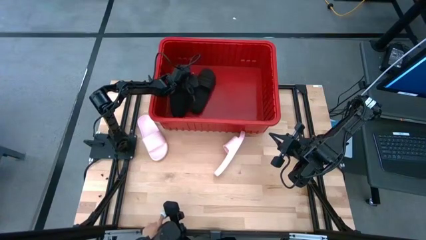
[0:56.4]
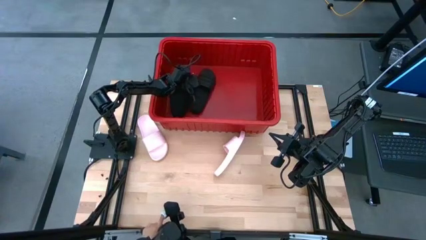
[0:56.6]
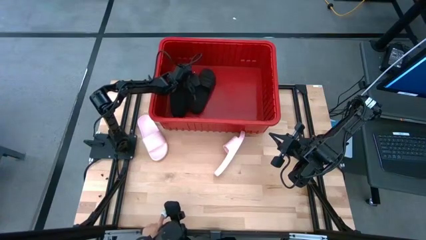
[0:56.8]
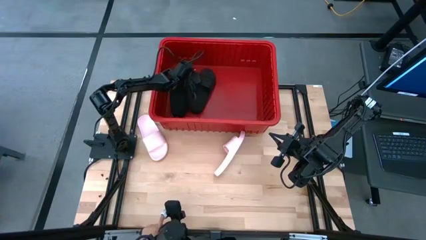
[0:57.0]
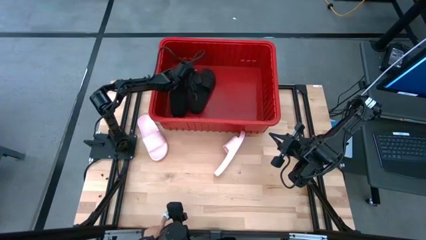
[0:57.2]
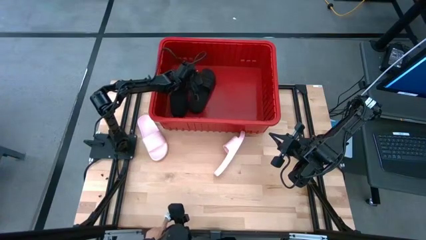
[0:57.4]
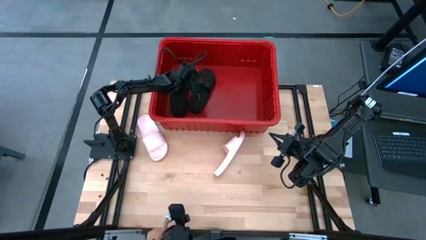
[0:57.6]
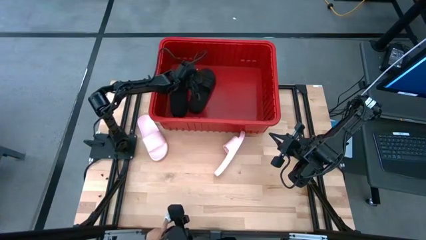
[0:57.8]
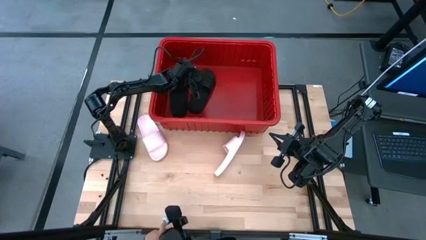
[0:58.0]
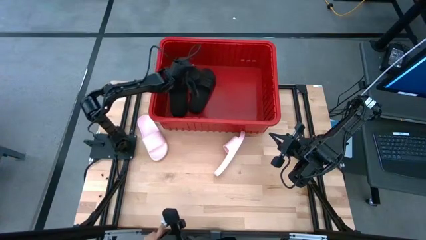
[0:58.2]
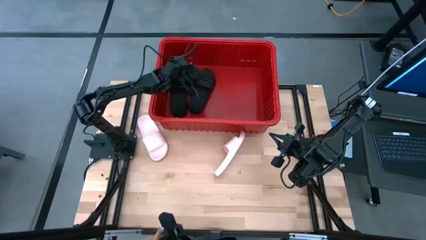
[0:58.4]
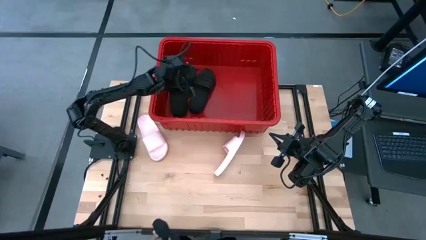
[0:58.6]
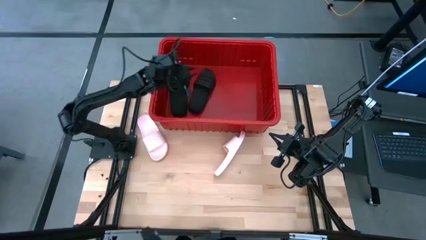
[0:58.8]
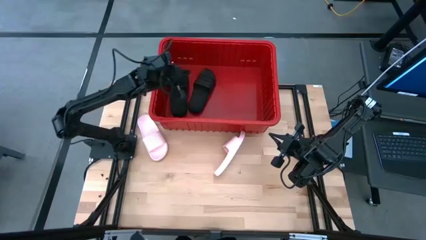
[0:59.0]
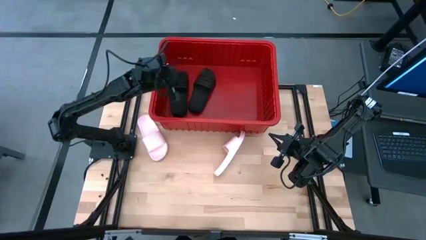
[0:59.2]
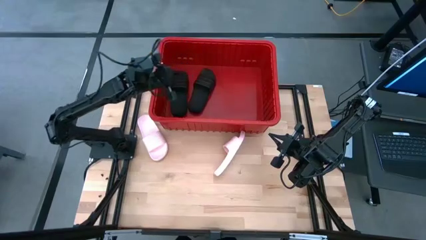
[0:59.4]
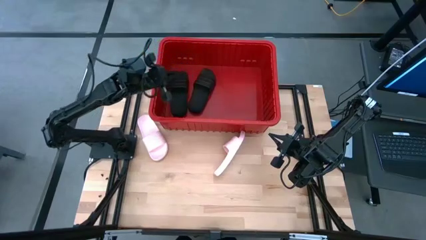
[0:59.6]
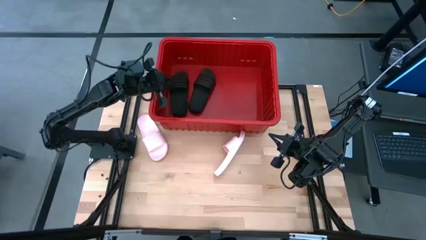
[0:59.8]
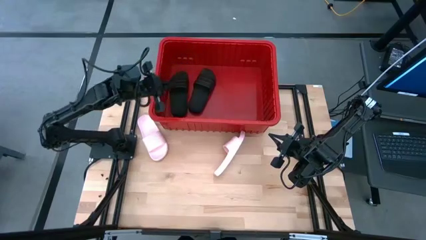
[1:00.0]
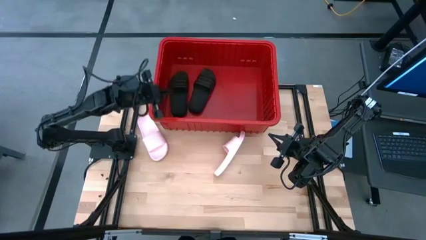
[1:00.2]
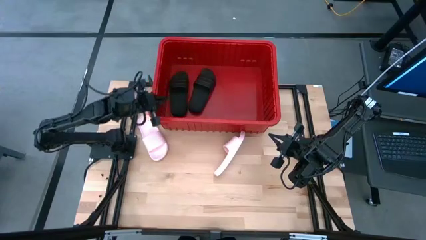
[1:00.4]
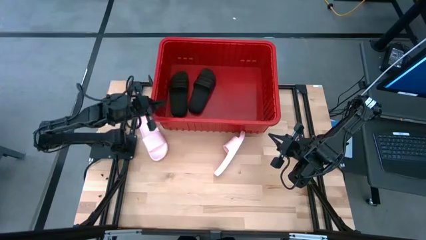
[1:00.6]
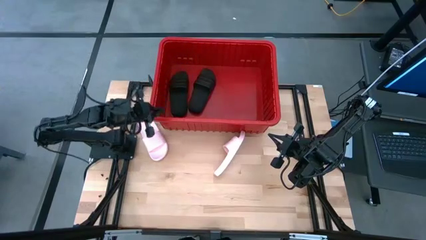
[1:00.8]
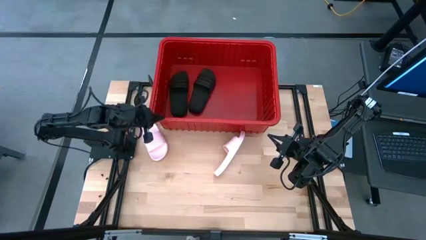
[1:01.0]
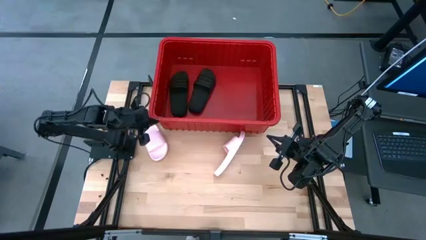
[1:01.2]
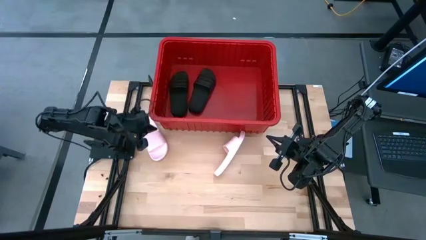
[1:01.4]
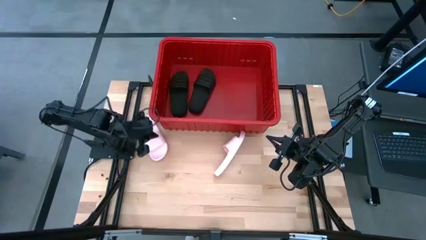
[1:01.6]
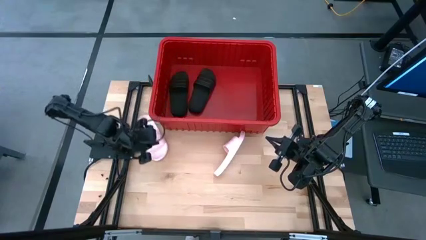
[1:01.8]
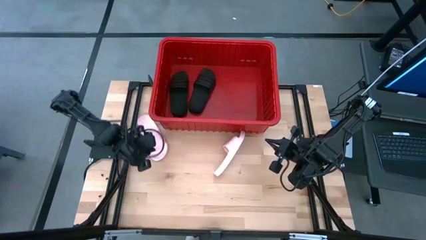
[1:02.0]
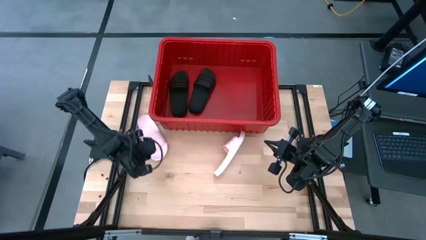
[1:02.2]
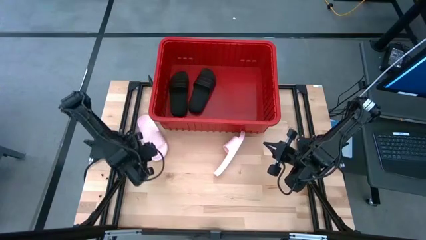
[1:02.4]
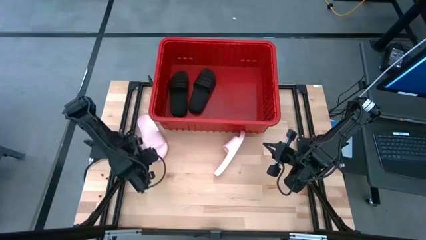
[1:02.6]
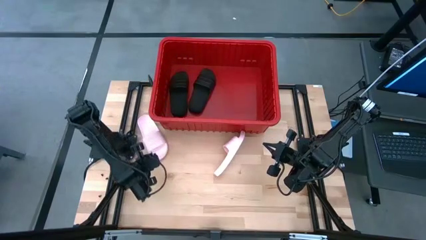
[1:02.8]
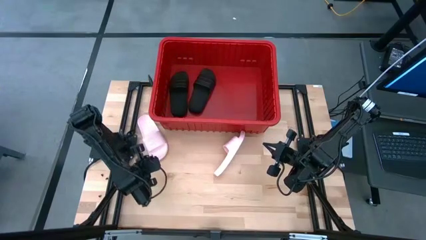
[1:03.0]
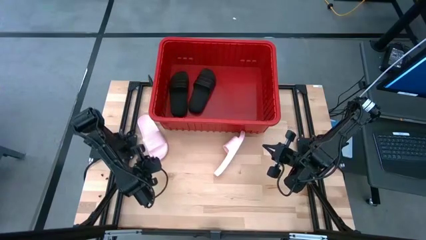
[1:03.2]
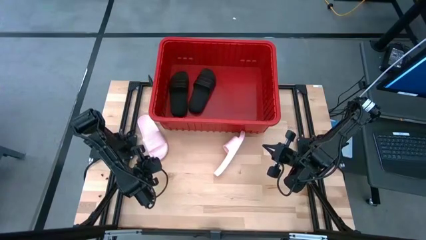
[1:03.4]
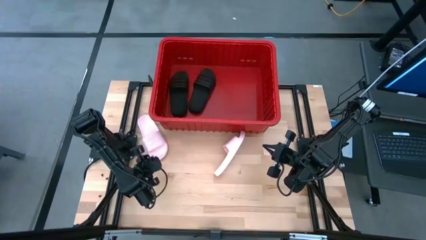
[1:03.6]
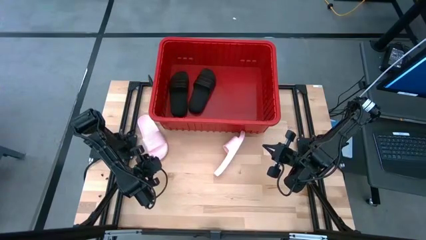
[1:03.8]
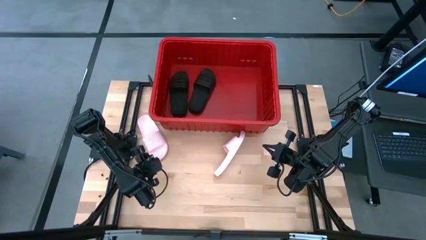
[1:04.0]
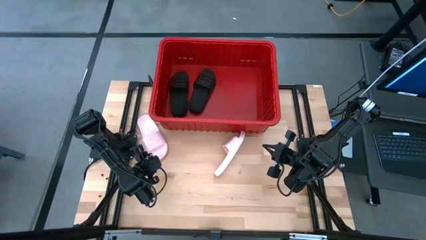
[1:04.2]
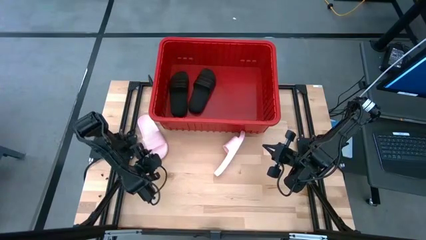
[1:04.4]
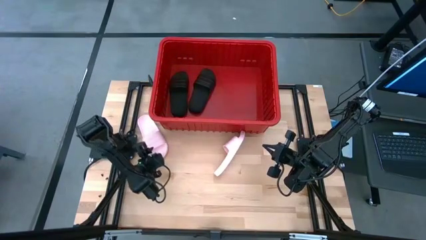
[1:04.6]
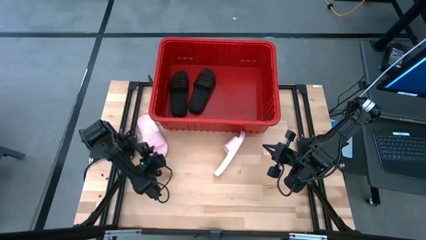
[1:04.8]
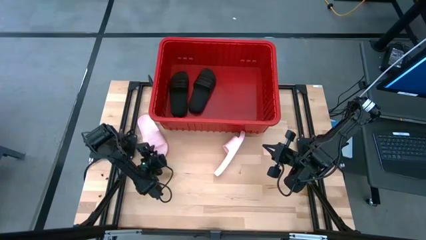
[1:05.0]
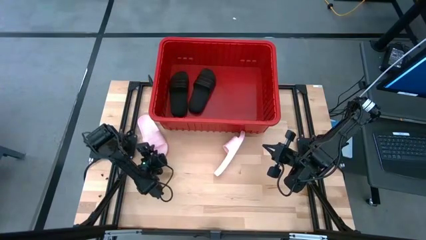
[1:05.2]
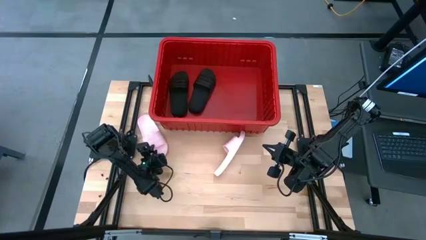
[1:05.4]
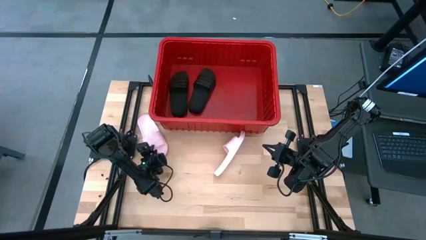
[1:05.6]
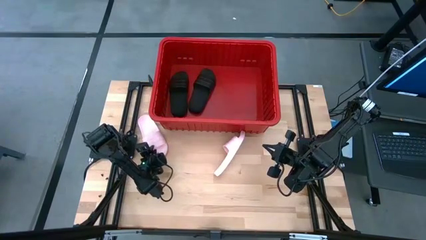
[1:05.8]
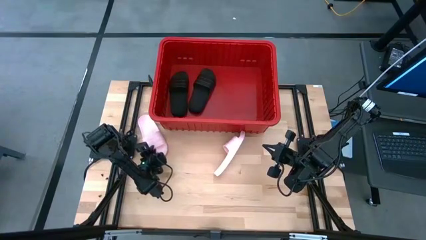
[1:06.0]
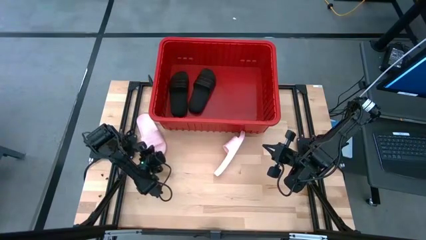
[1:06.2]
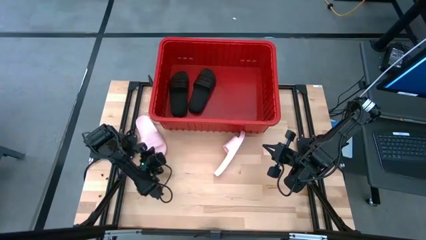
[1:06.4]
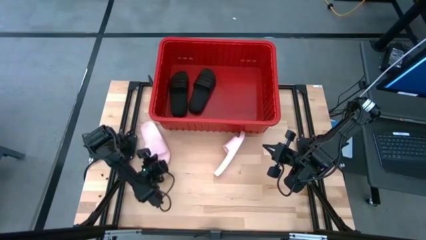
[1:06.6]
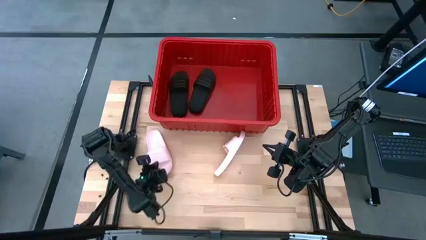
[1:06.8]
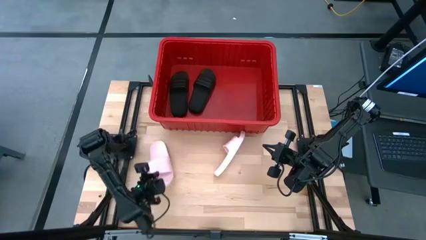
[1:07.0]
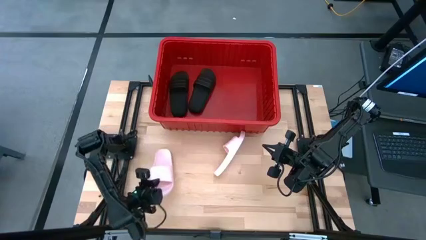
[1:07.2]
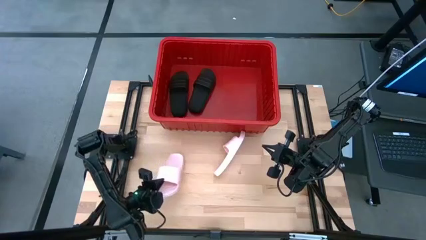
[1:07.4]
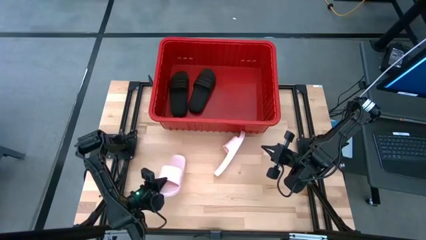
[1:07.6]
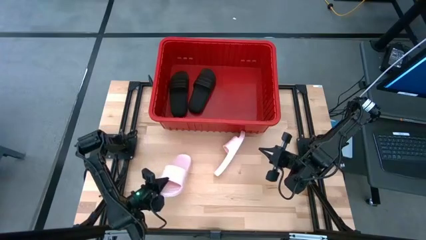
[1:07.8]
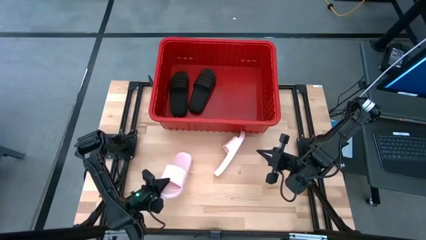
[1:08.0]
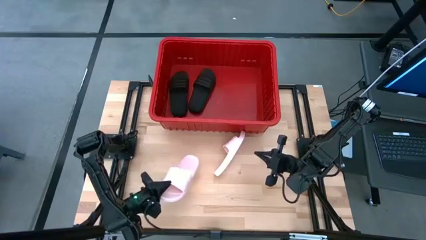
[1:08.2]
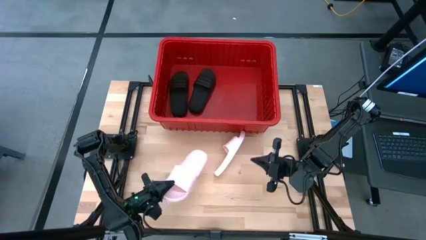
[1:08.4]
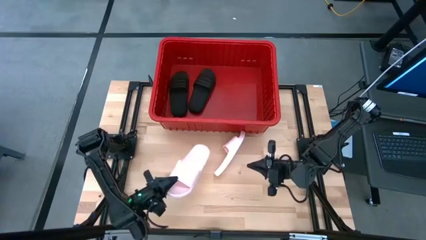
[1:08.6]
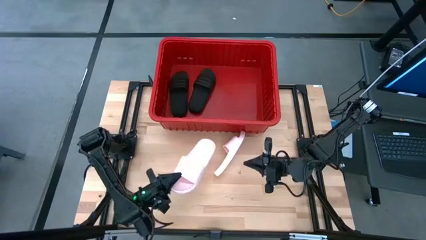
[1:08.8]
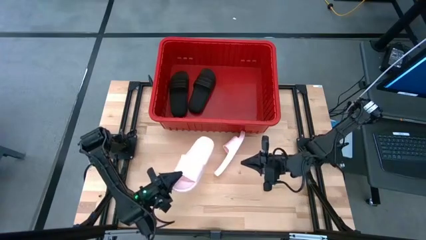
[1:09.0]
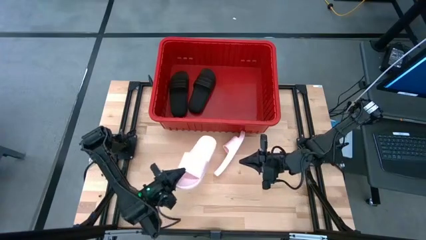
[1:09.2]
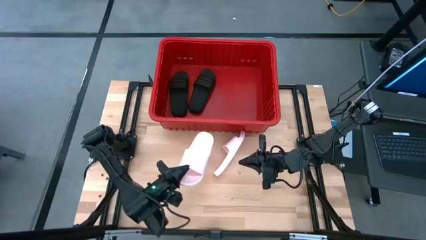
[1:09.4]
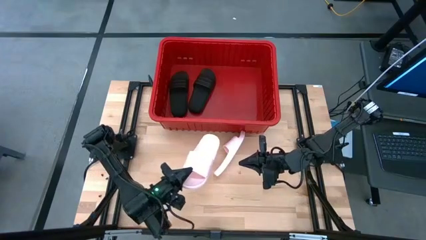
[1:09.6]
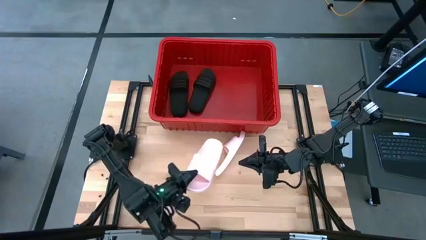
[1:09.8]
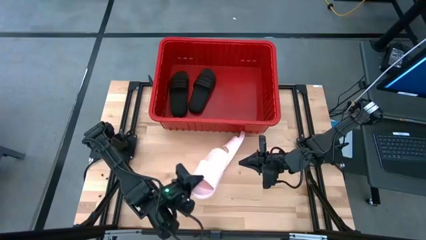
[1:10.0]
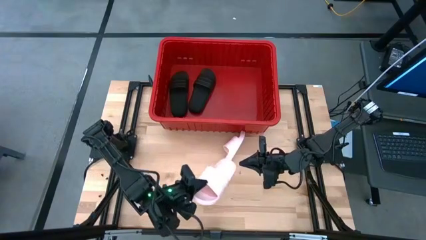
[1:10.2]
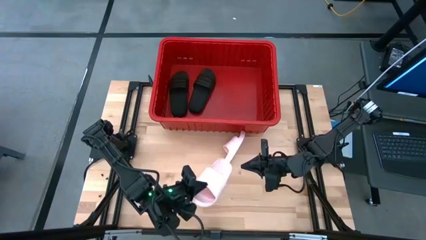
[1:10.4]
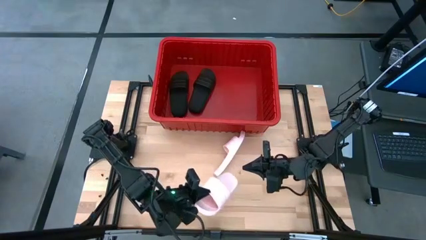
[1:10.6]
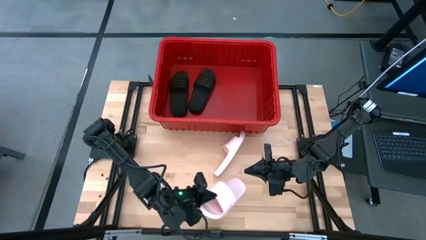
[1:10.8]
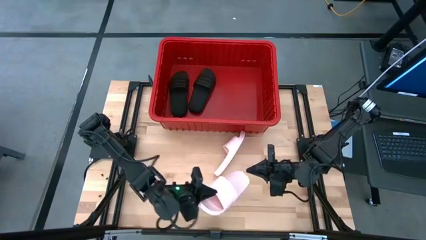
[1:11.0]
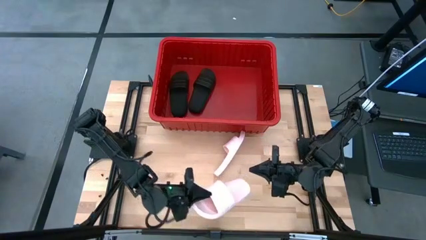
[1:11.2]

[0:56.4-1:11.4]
Task: Pick and place slides into bin
Put the left pink slide into the red bin

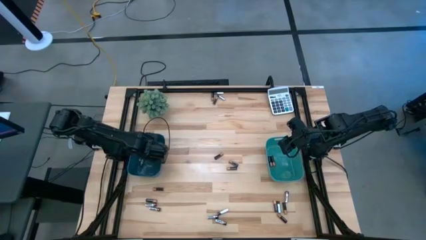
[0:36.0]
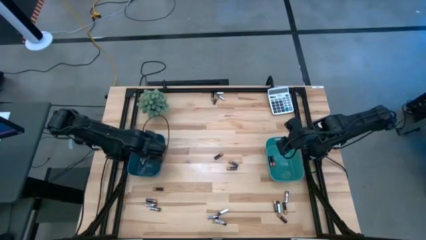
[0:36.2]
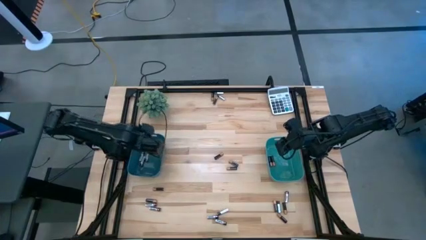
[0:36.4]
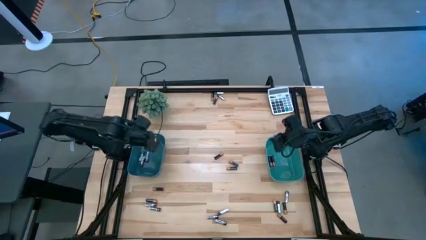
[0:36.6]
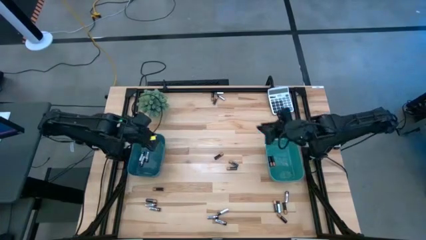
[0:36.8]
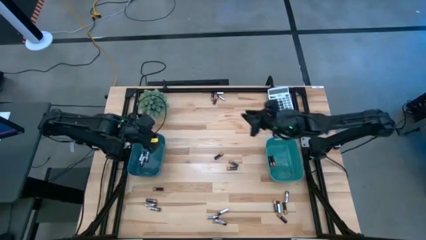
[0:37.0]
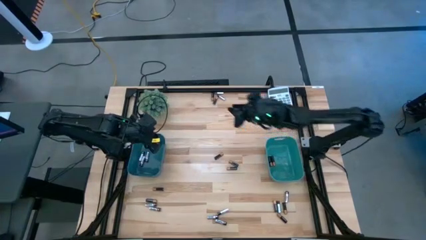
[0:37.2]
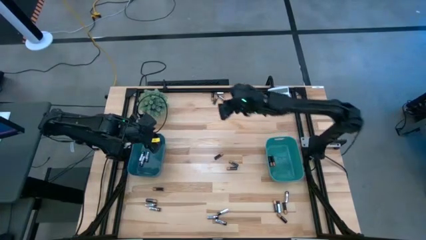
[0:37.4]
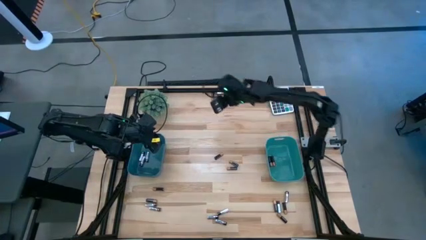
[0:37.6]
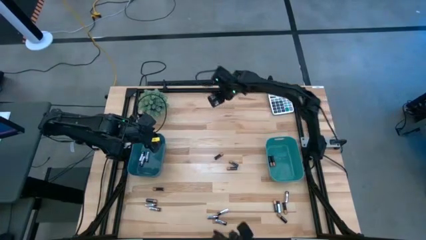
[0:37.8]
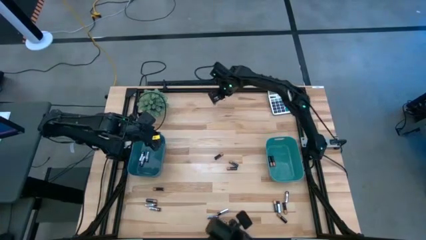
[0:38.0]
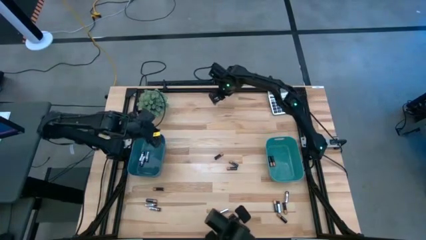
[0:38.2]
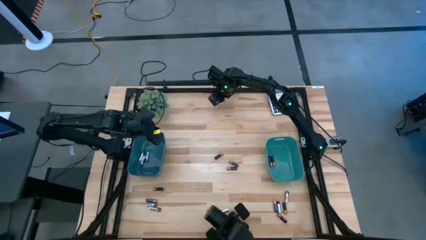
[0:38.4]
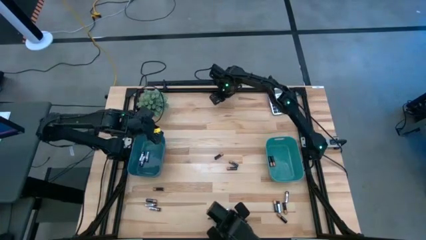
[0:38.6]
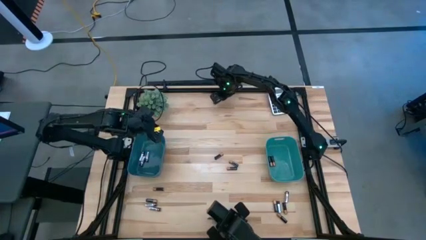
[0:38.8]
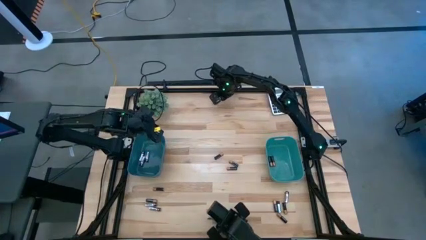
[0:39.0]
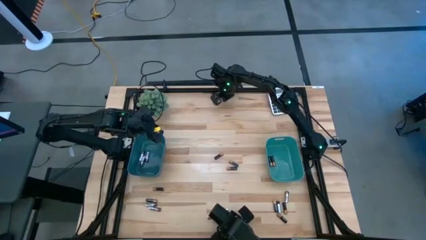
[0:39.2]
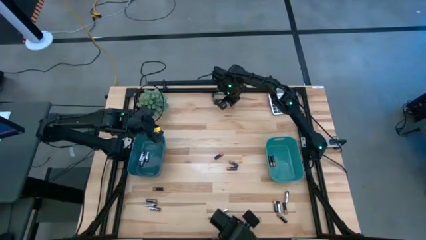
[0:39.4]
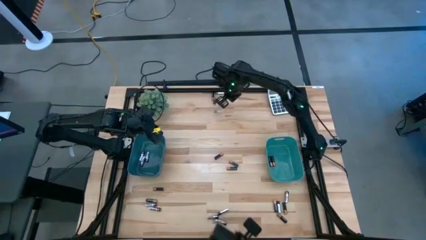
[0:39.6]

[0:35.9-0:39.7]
Task: Sort batteries
Put the silver battery into the blue bin
